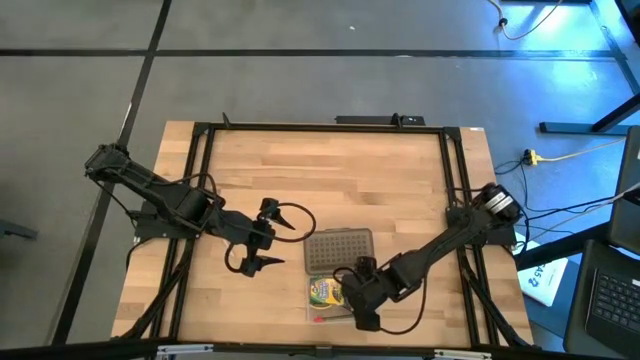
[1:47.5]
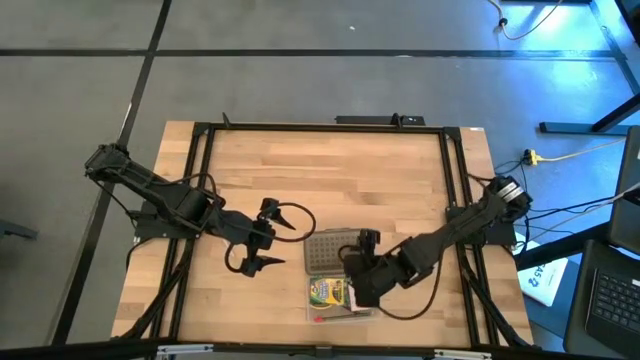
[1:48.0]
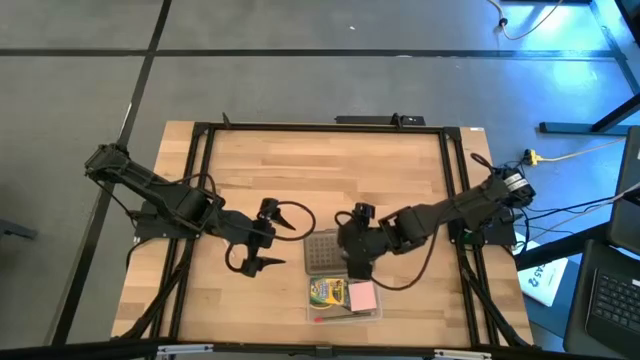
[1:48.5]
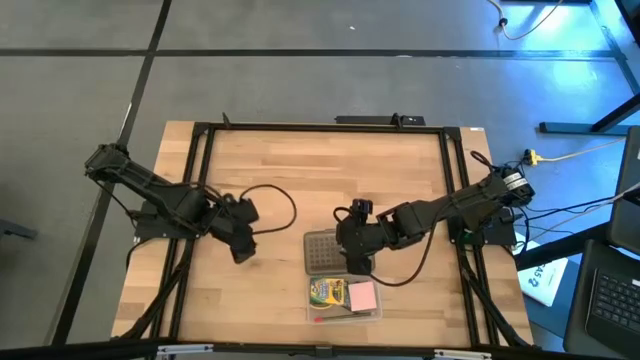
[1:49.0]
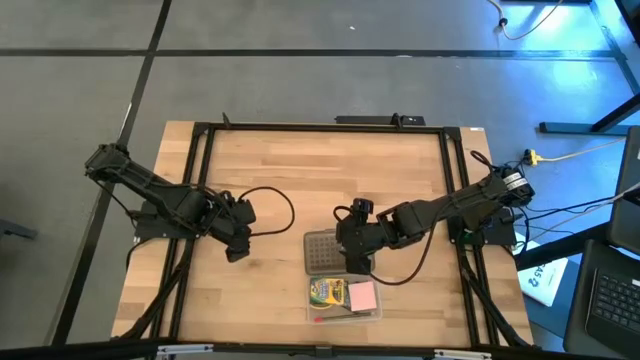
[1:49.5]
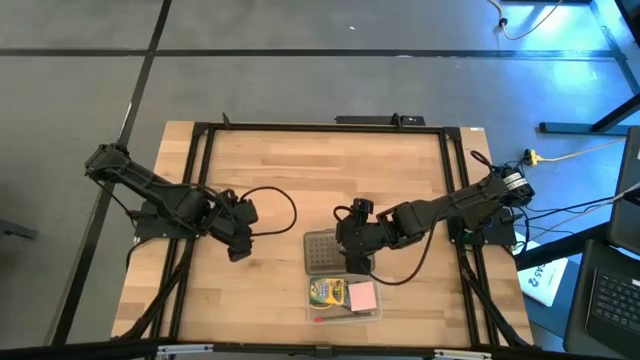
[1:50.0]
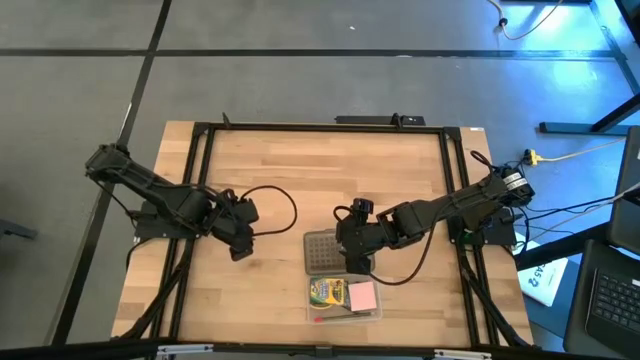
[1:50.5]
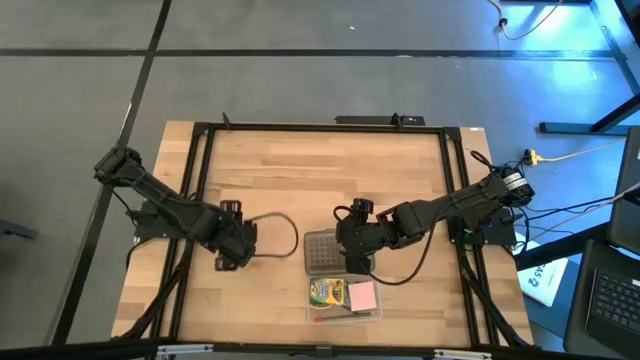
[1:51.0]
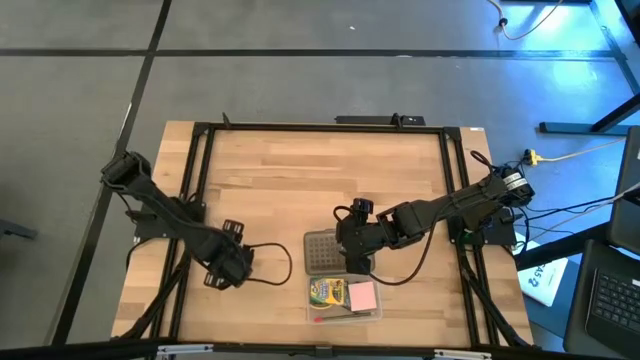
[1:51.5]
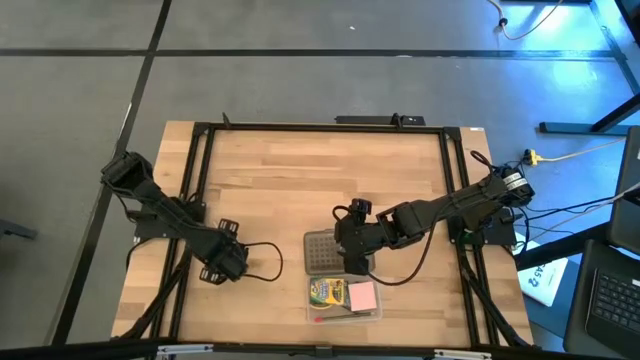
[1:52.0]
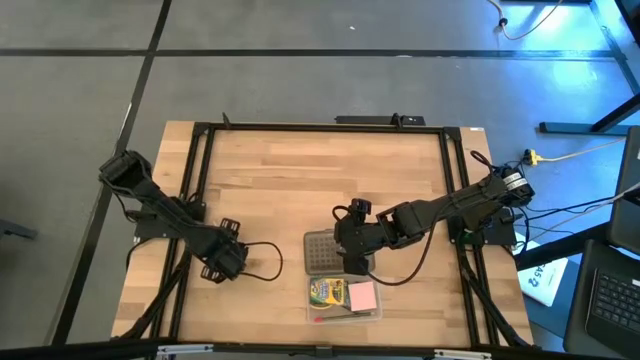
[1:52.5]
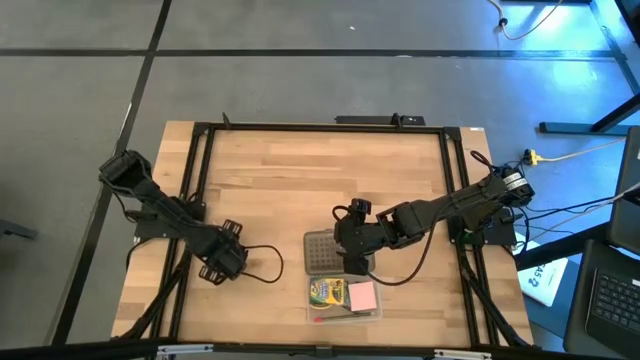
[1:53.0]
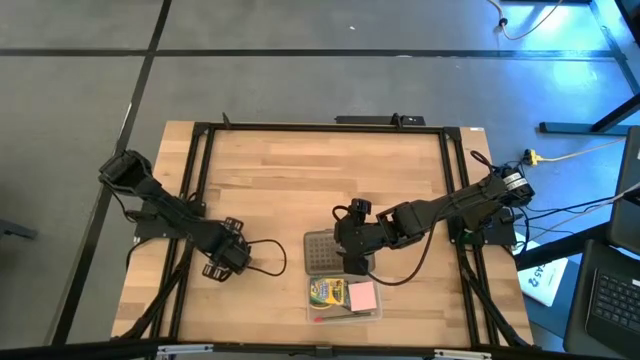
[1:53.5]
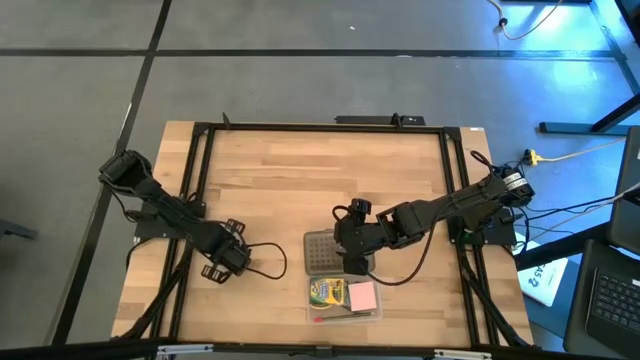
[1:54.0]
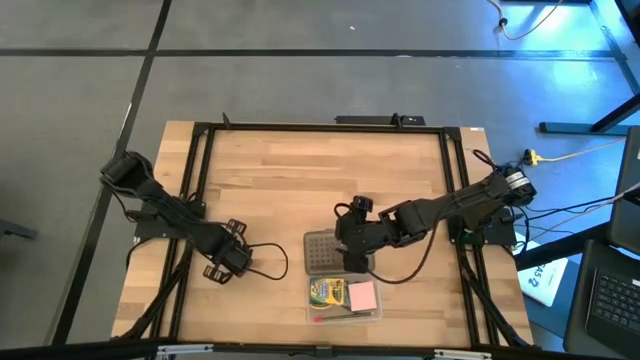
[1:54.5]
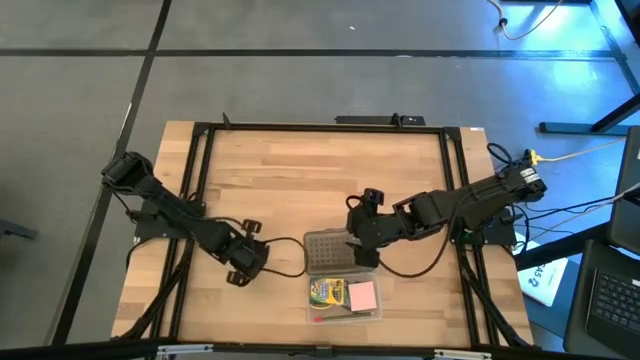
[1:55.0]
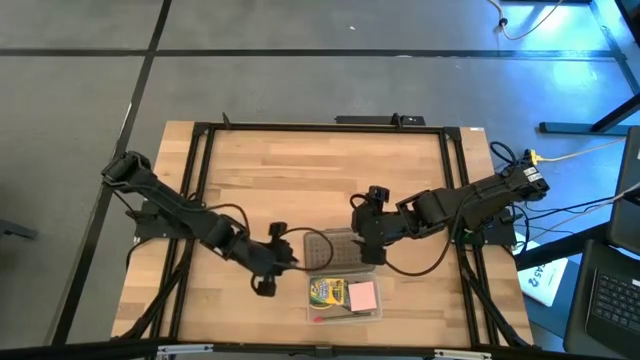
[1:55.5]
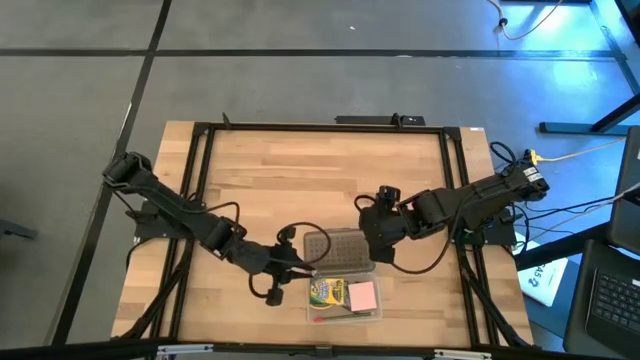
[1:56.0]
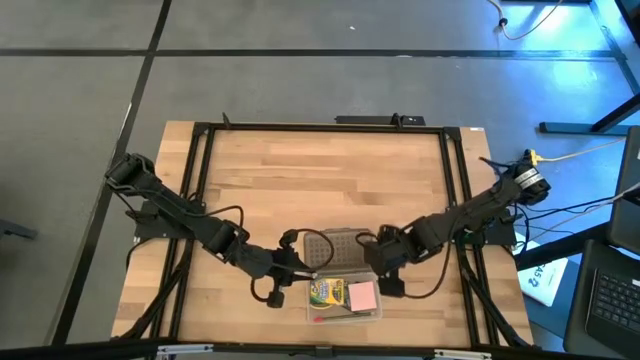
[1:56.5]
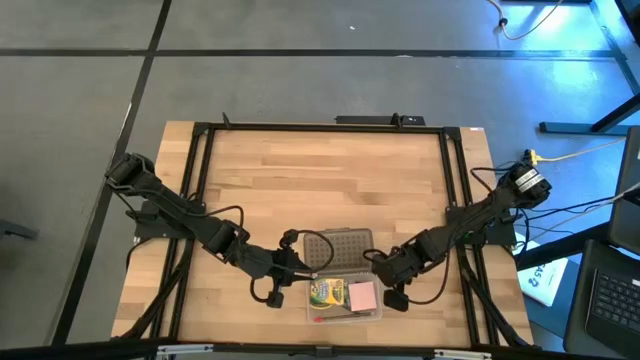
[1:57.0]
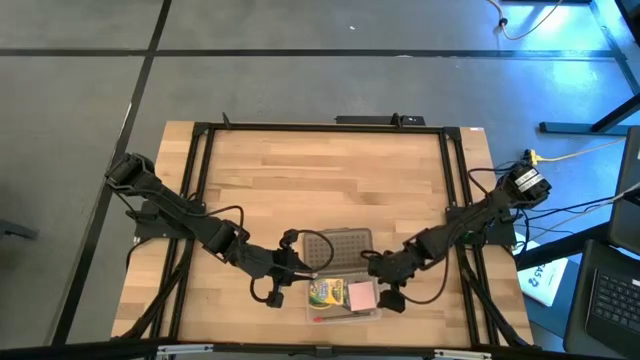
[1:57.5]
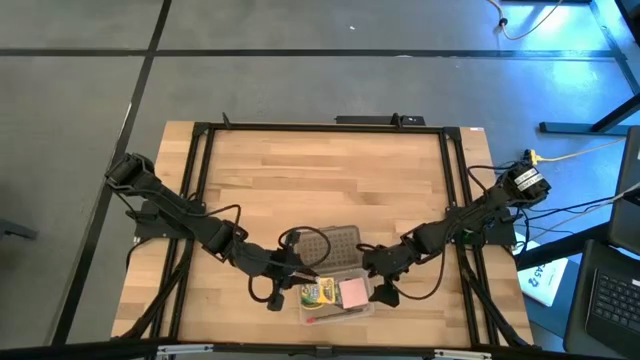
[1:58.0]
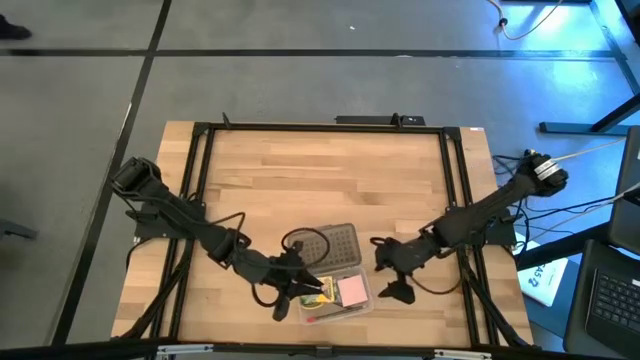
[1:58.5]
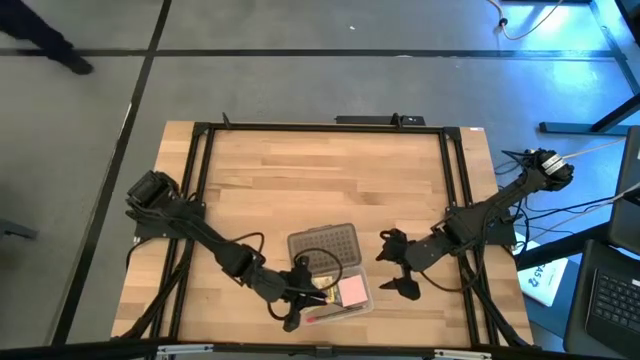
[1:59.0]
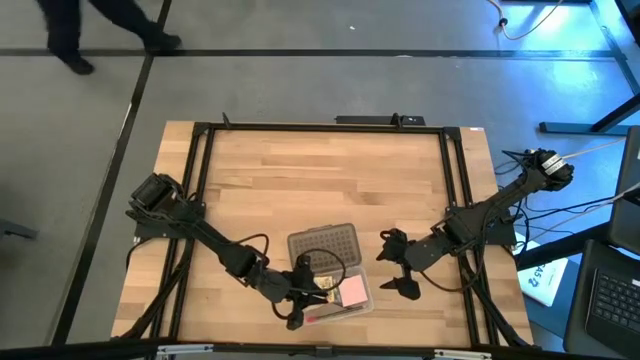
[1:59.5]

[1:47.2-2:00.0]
Task: Pack school essentials
Put the pink pen into the supply box

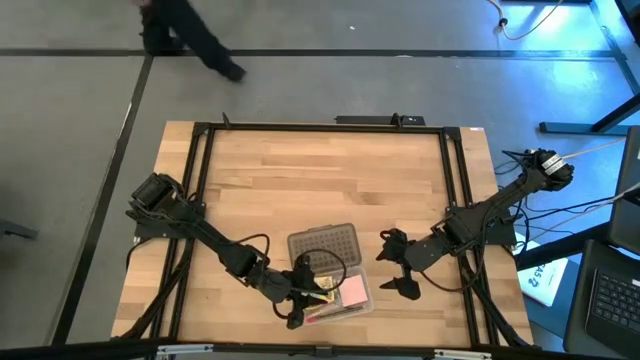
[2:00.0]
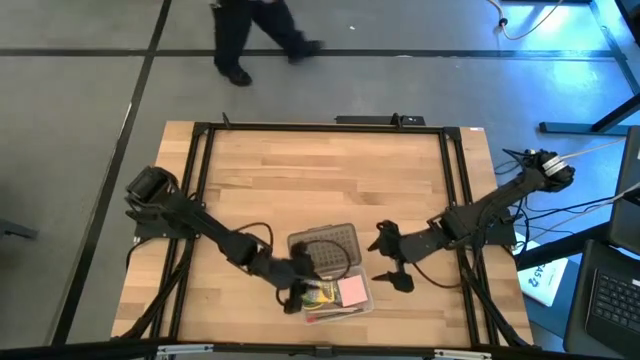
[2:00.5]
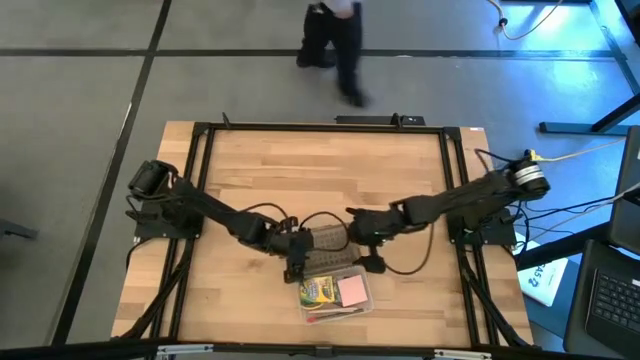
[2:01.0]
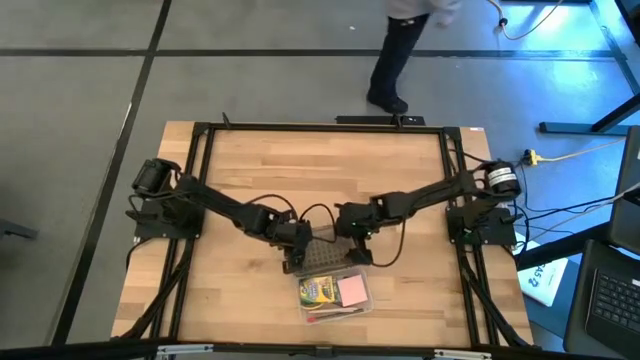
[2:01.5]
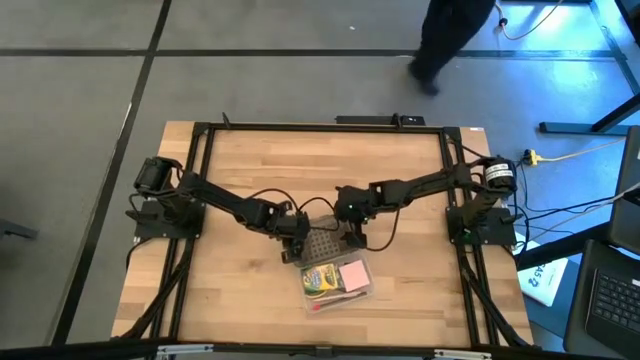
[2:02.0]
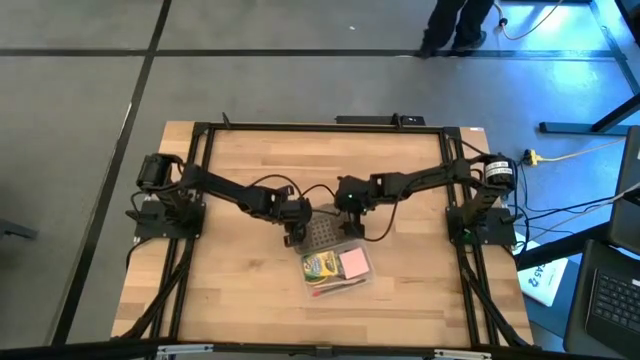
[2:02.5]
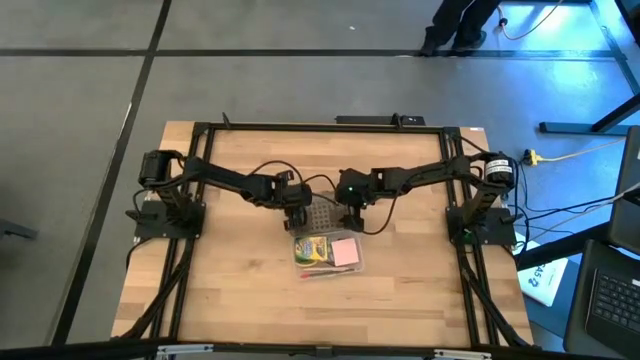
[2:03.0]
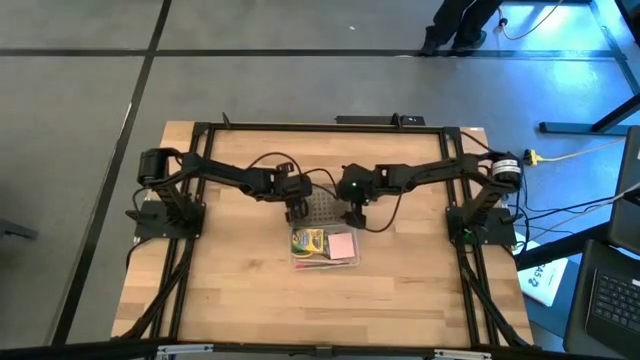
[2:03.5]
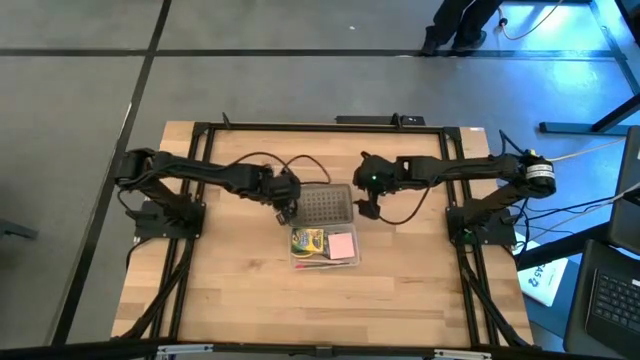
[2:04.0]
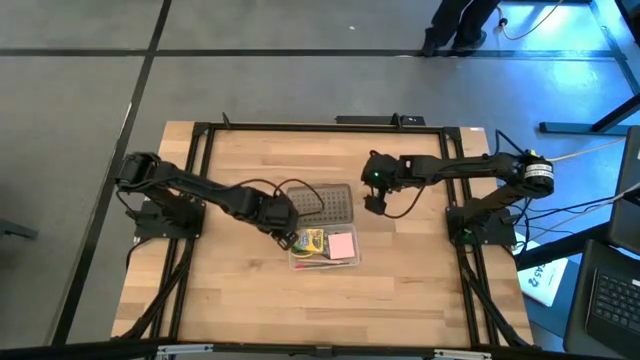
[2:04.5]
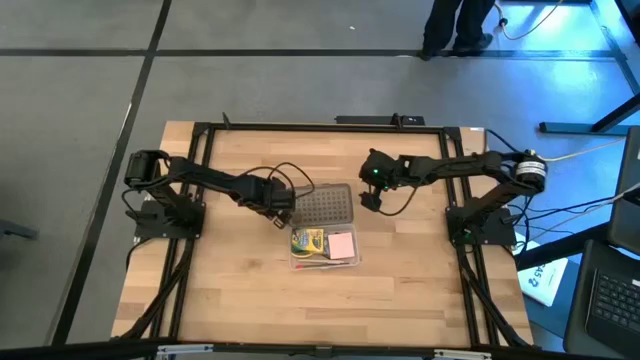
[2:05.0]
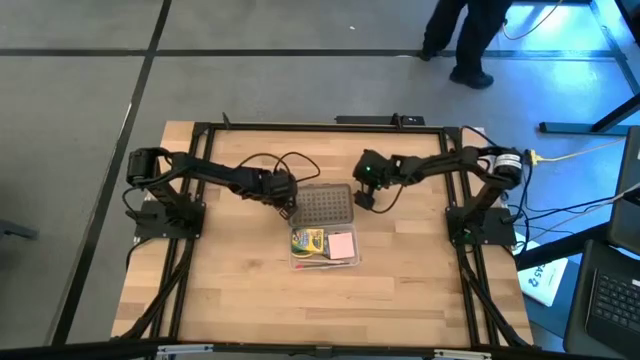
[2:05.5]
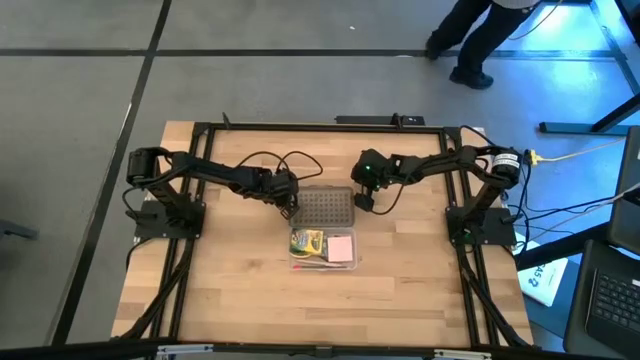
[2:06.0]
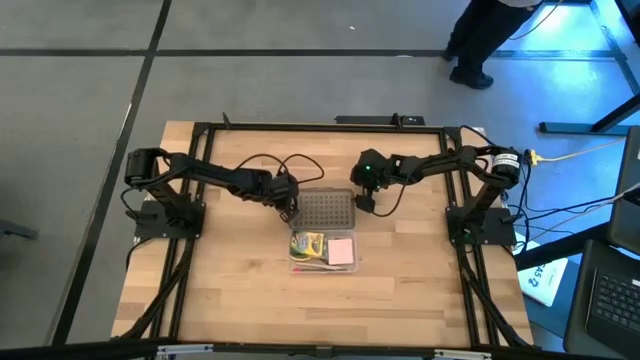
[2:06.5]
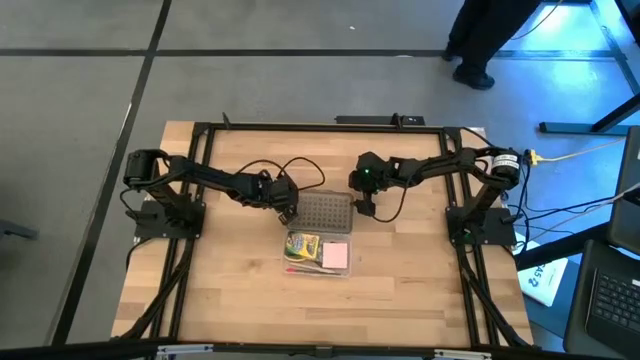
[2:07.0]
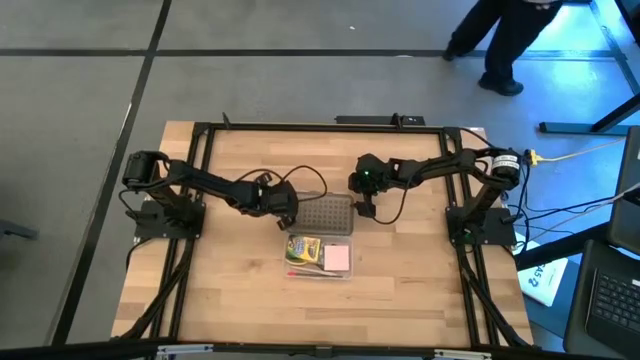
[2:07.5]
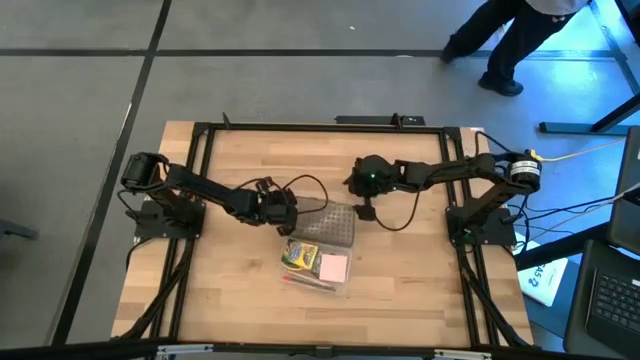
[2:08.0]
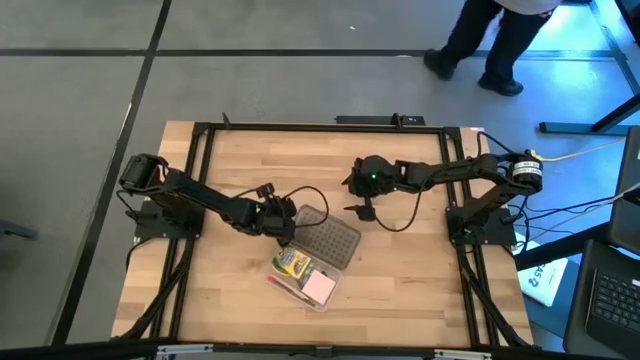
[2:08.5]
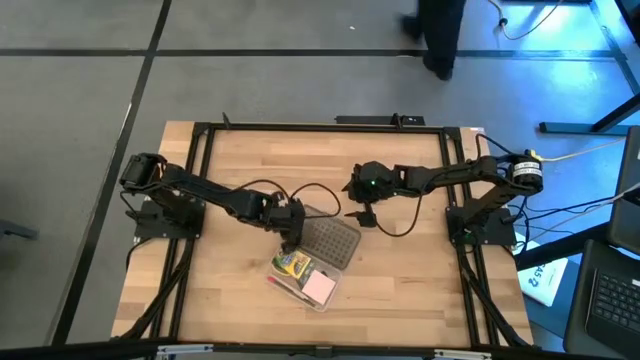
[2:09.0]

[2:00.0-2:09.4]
Close the supply box
